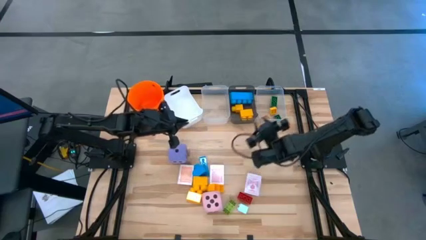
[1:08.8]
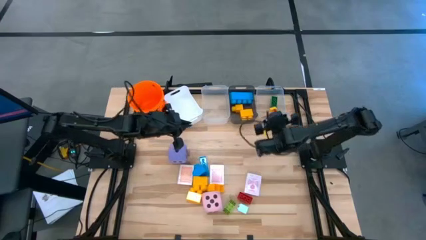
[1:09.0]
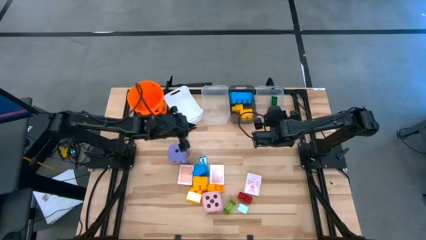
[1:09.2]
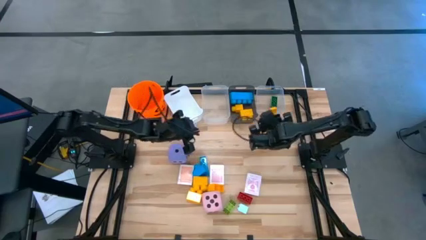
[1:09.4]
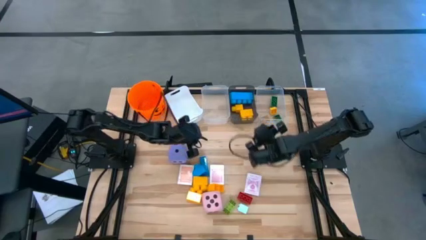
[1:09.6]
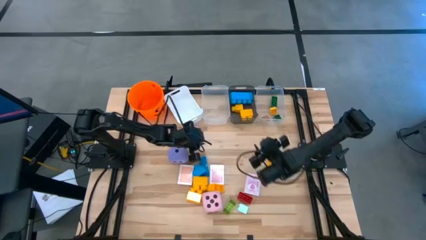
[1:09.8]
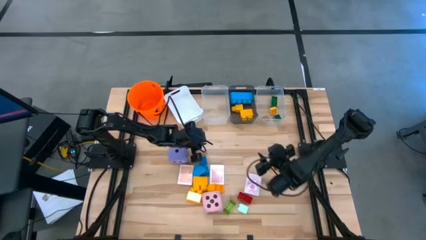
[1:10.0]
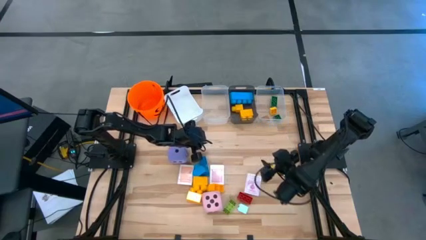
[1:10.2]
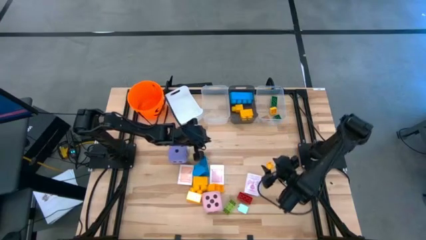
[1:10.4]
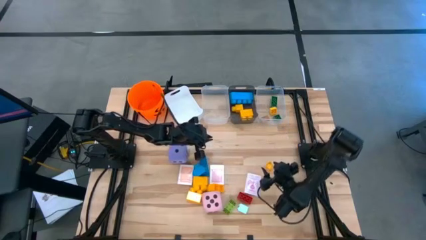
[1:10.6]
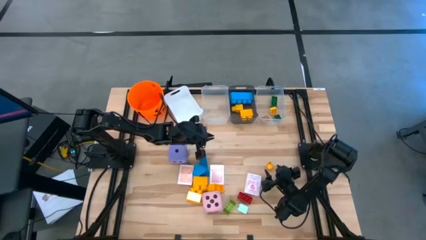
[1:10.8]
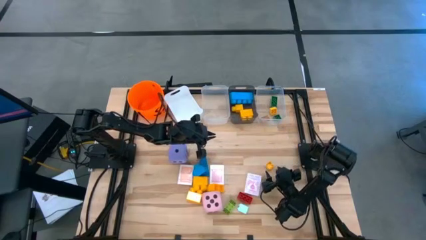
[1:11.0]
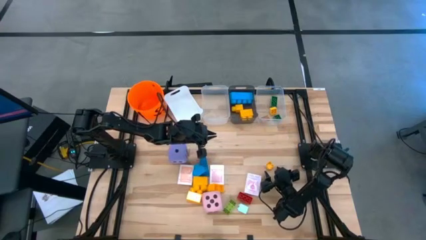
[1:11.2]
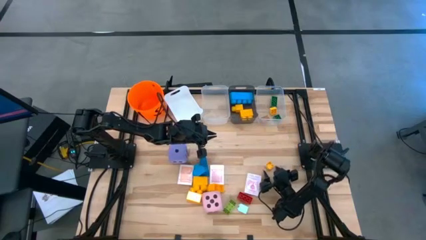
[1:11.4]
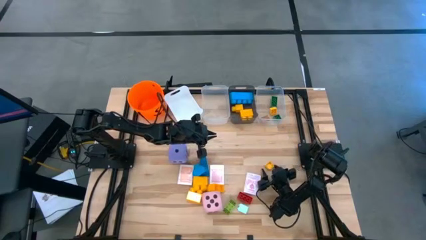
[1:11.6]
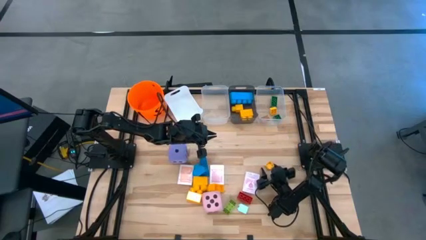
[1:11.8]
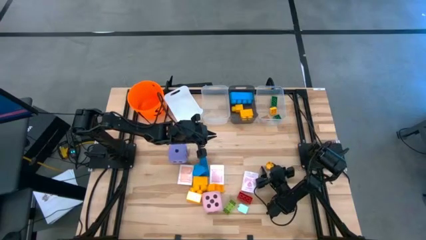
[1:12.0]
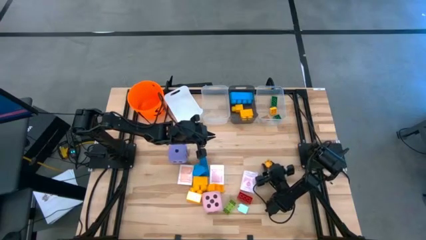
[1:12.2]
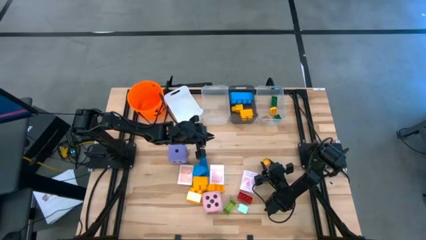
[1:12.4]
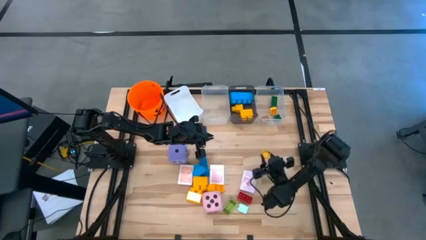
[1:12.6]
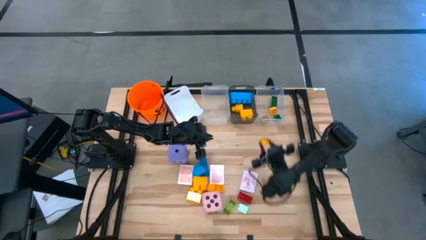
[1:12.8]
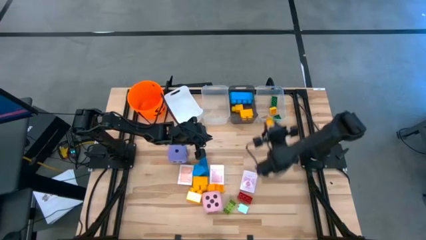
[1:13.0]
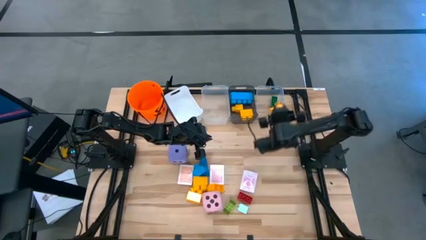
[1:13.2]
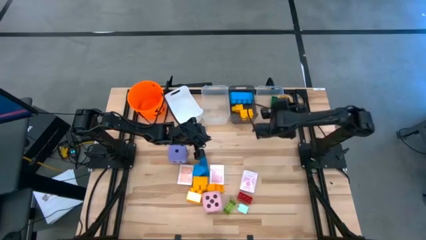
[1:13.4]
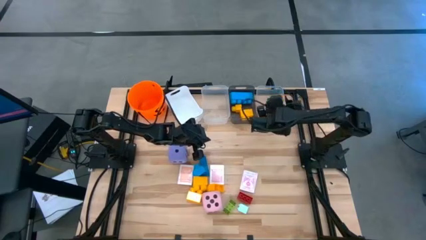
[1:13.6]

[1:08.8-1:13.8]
Task: Pick & Place Toys
Put the small yellow game piece into the right transparent bin

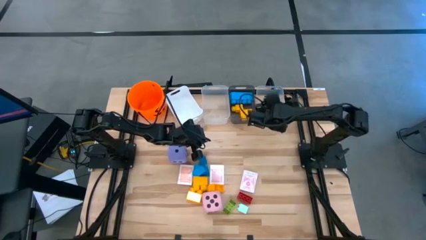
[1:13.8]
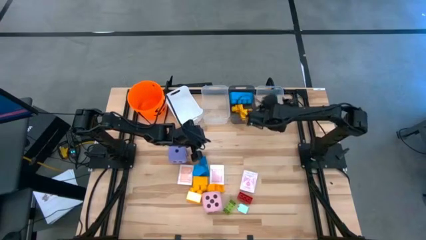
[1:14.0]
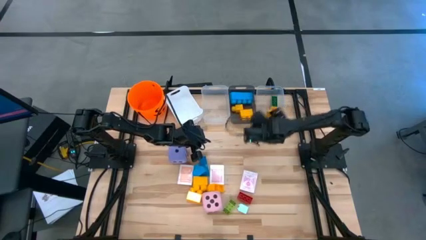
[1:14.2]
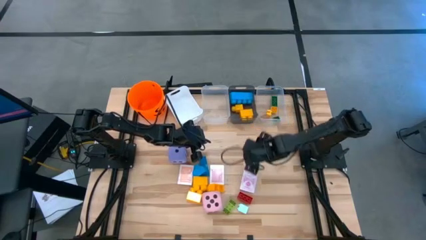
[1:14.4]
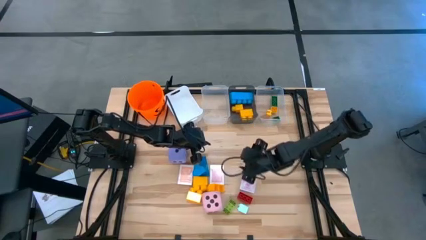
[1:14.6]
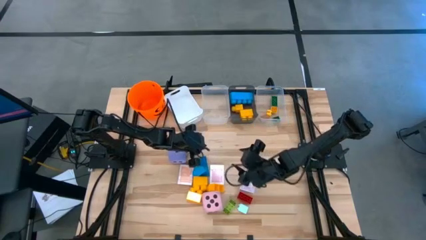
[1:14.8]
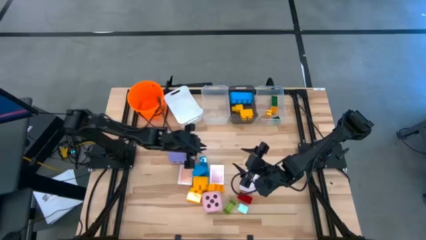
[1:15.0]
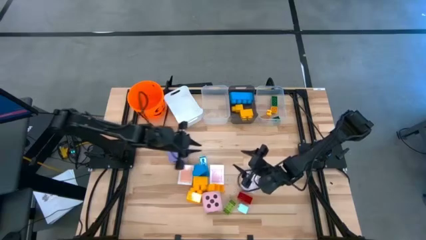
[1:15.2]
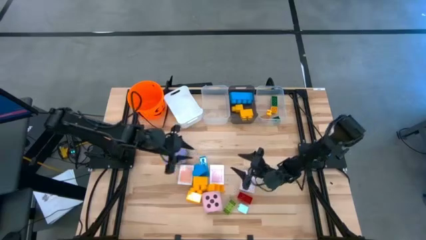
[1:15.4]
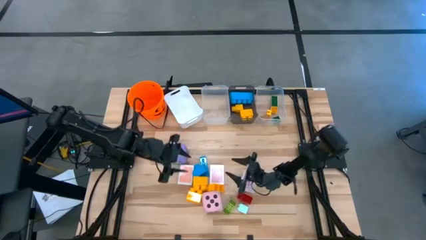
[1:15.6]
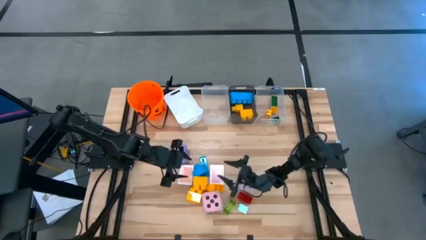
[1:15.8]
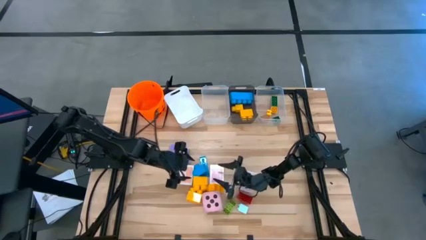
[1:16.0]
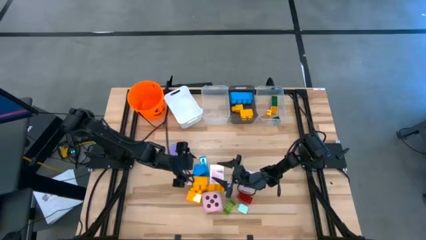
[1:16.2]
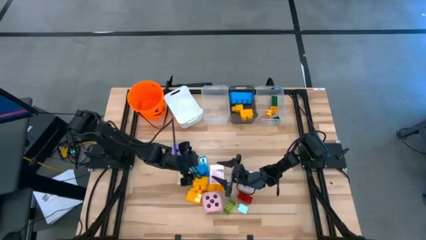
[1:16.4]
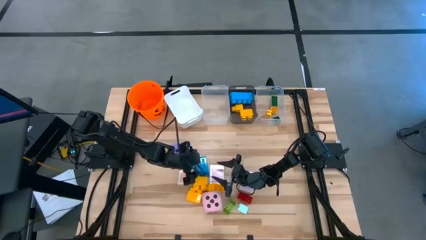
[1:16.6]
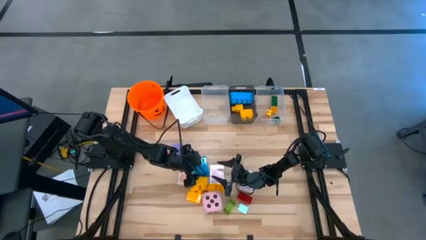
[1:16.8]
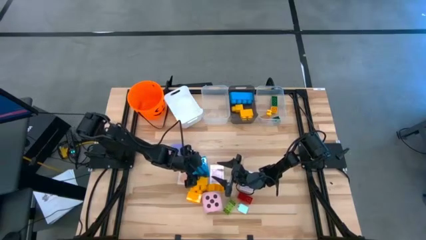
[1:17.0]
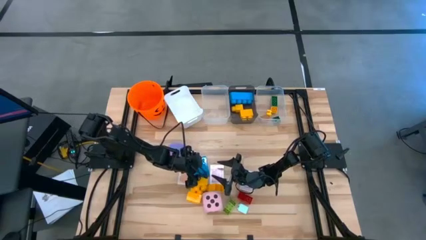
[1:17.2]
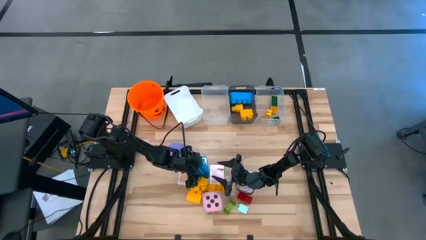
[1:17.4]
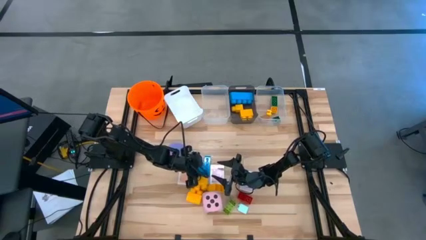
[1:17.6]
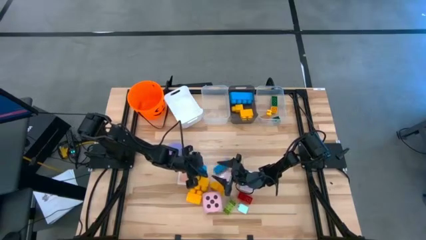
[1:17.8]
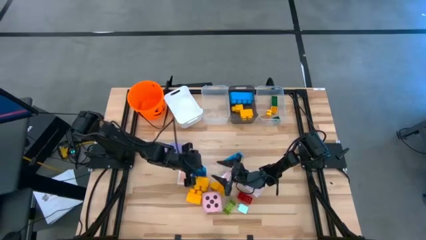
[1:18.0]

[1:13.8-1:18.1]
Put the large blue game piece into the black bin

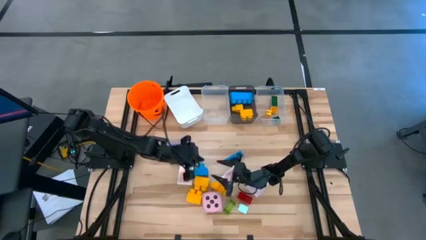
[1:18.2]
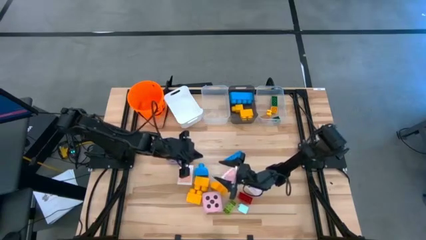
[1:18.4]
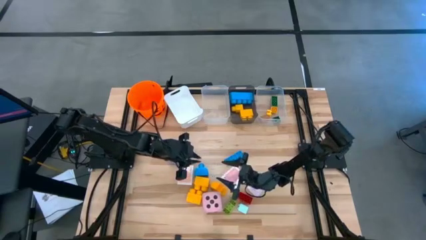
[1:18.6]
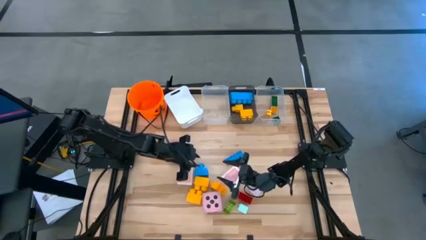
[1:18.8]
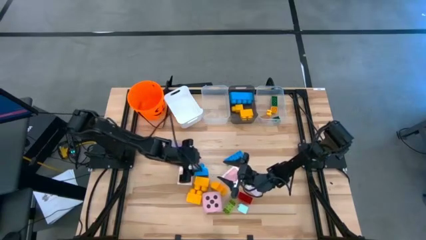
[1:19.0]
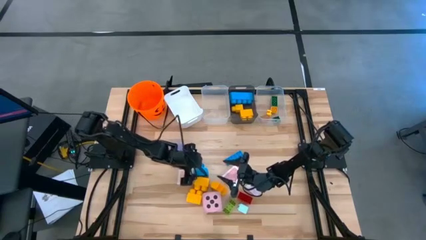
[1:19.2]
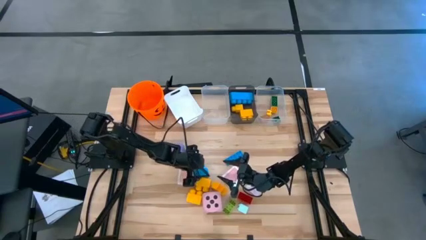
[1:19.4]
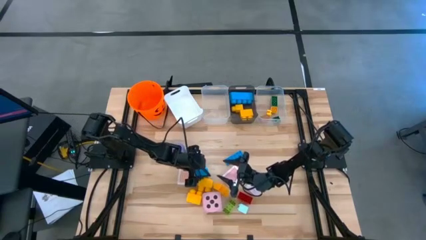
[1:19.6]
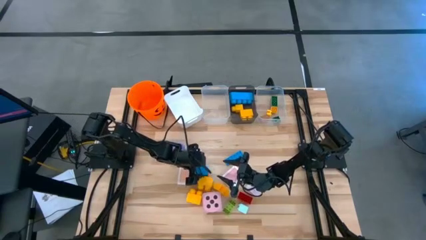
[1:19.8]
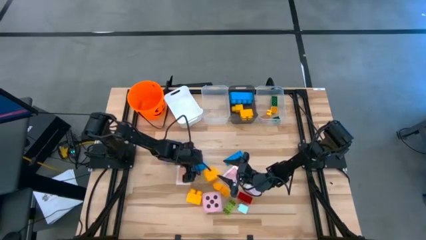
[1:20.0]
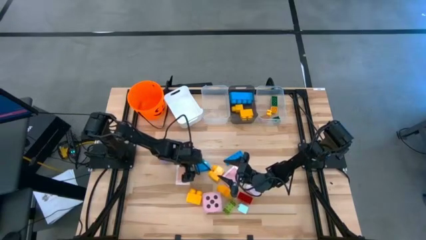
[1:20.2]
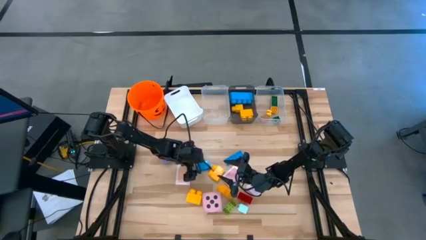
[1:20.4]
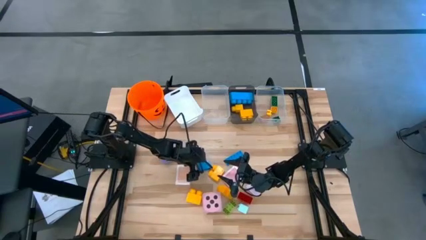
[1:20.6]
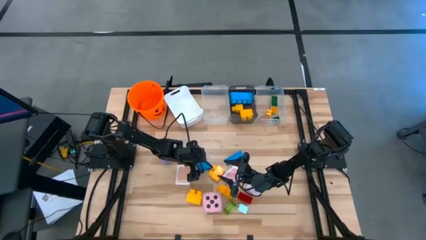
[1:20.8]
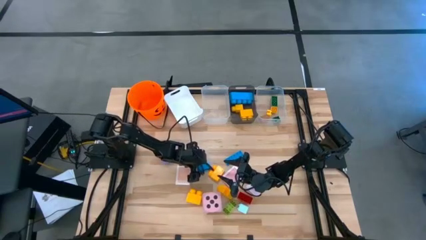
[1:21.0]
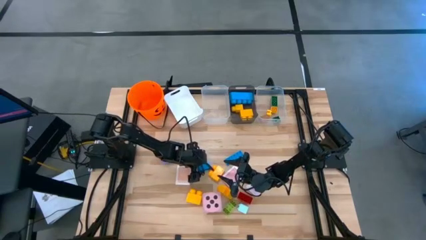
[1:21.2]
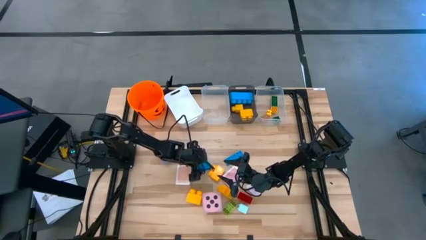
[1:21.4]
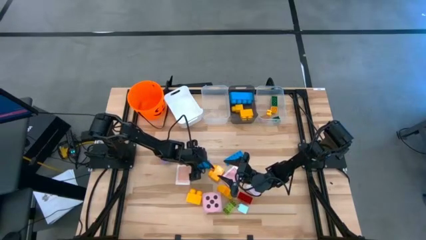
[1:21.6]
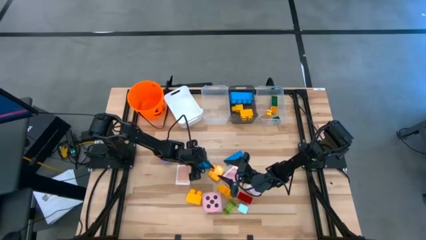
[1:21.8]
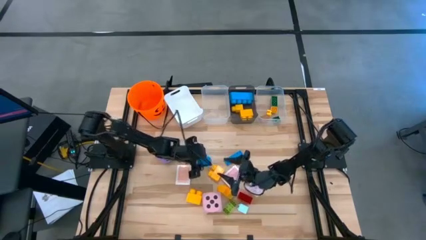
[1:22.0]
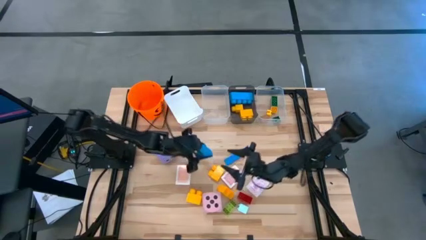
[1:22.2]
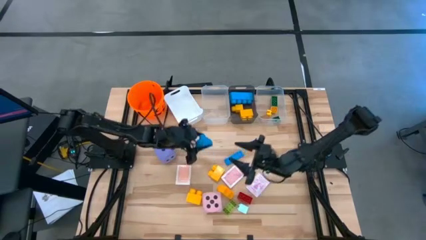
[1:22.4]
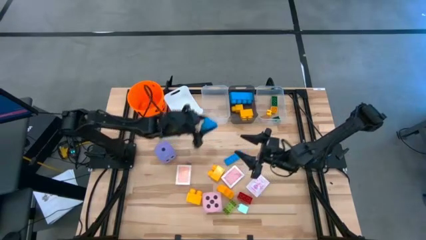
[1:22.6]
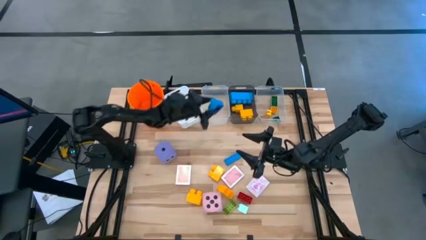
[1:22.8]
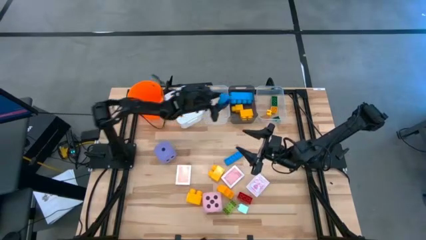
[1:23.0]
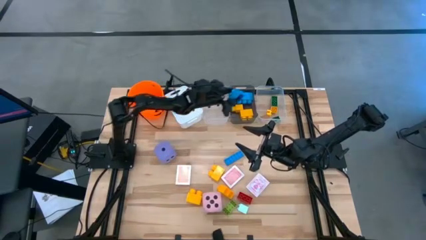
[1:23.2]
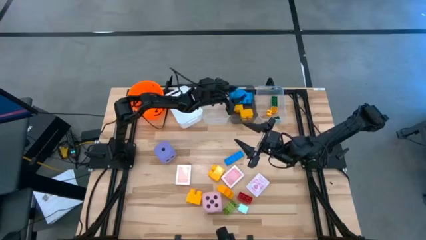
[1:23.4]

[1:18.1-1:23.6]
Put the large blue game piece into the black bin
